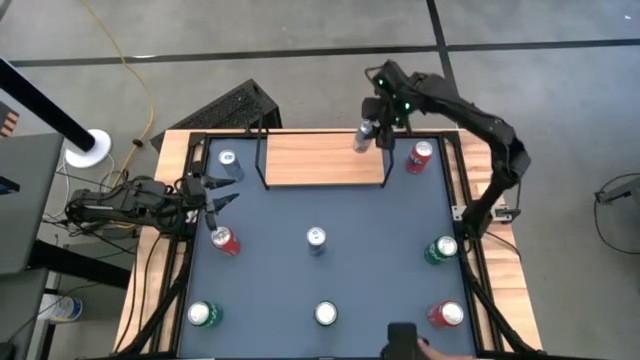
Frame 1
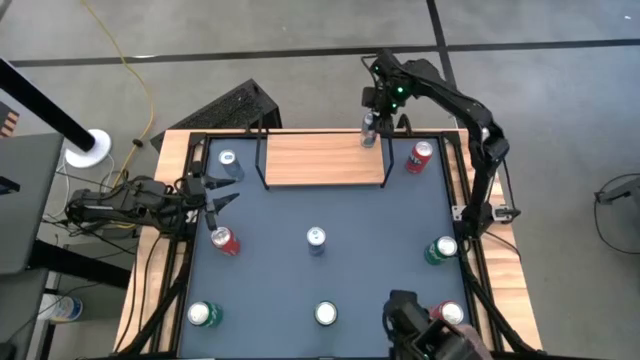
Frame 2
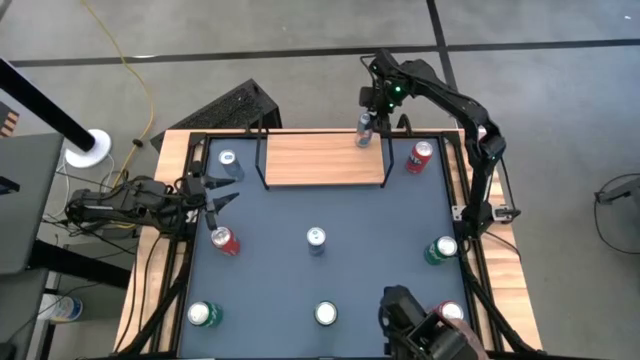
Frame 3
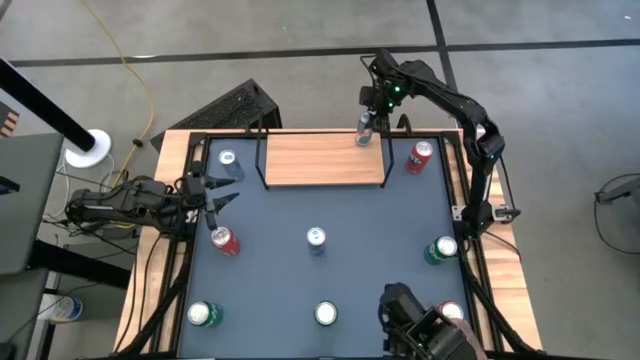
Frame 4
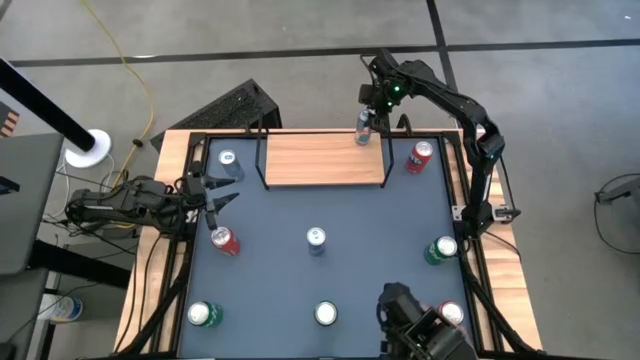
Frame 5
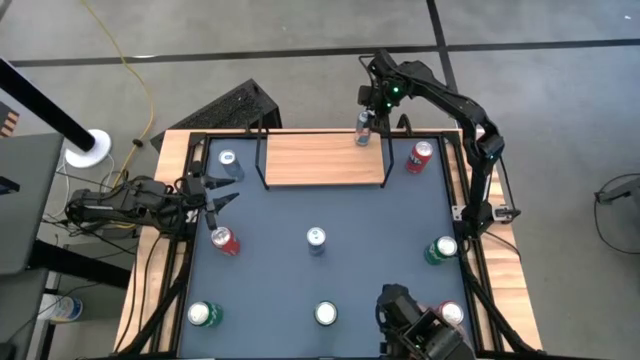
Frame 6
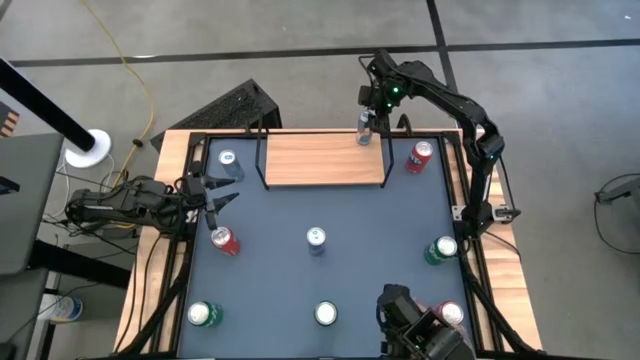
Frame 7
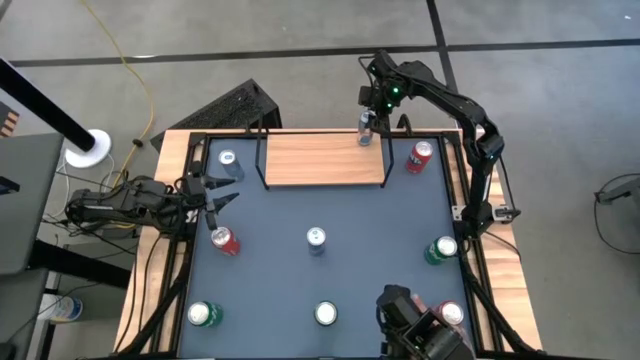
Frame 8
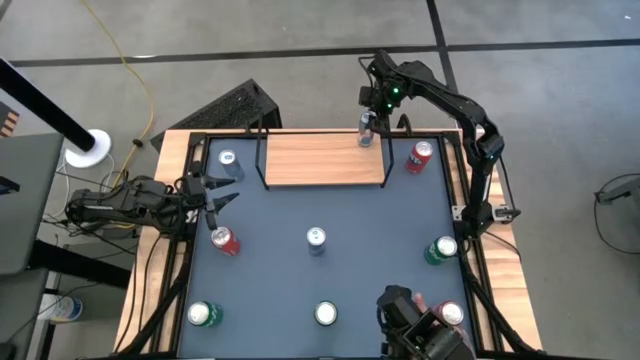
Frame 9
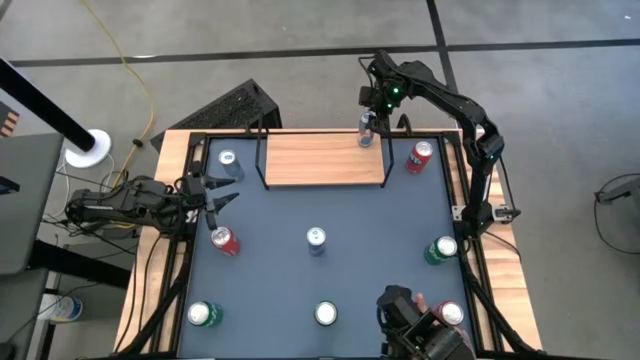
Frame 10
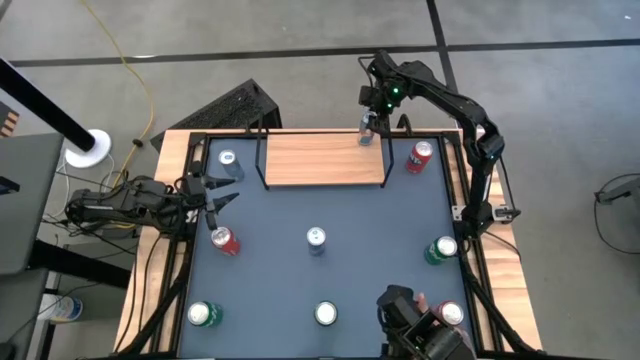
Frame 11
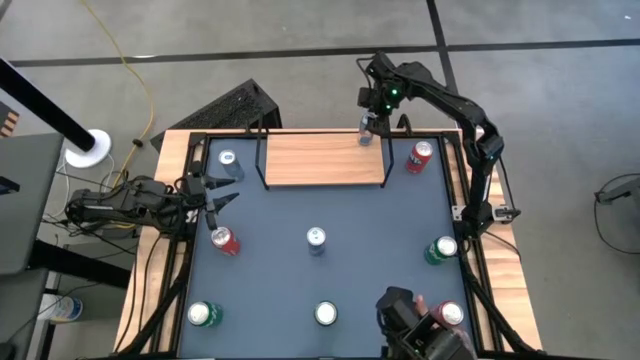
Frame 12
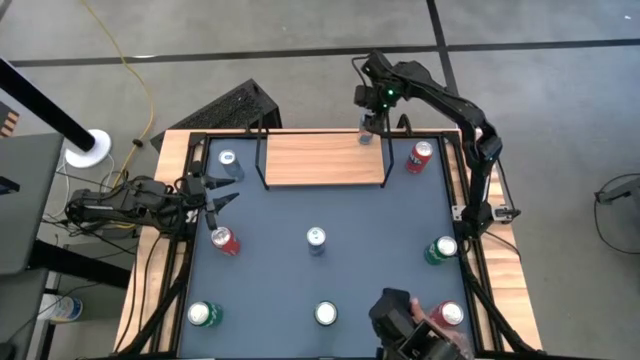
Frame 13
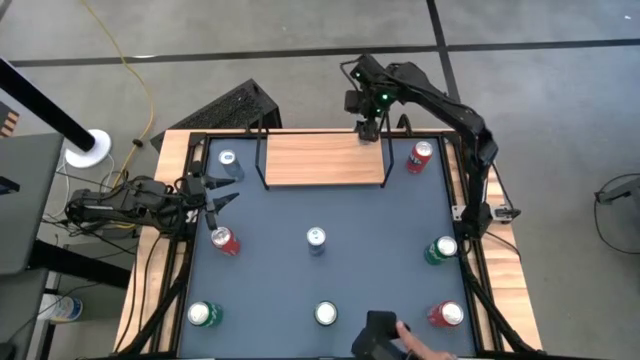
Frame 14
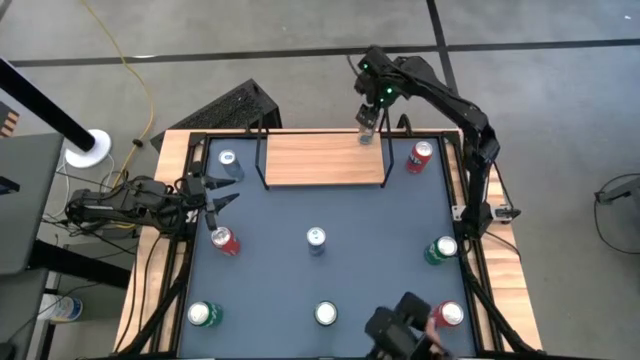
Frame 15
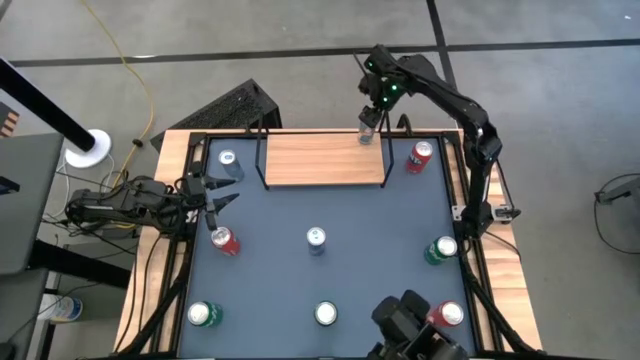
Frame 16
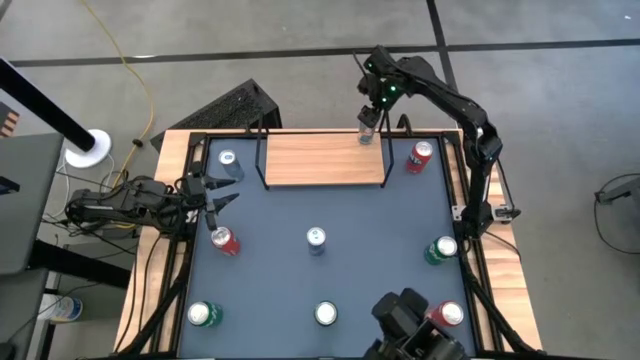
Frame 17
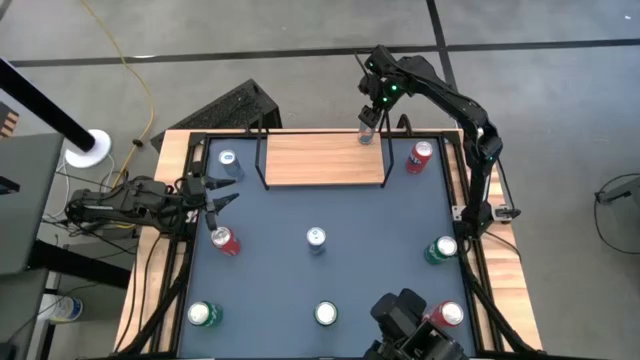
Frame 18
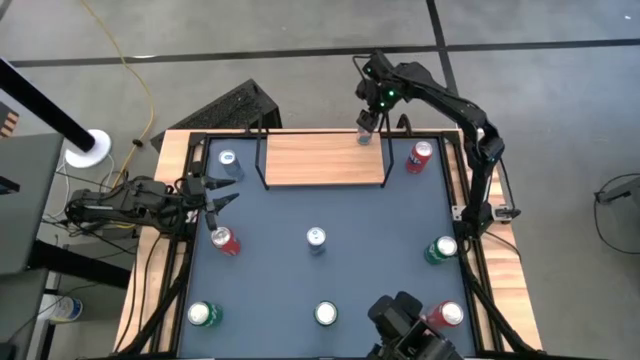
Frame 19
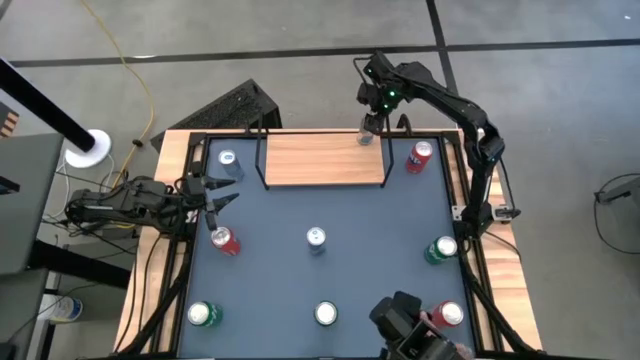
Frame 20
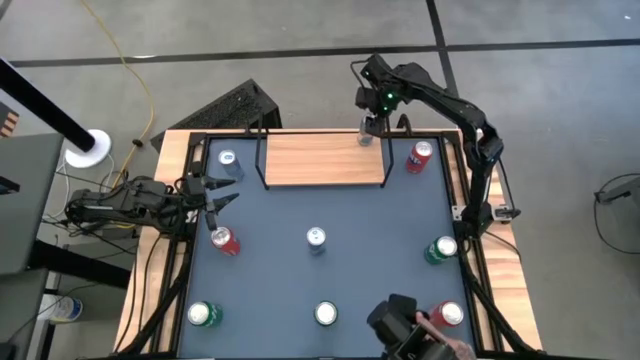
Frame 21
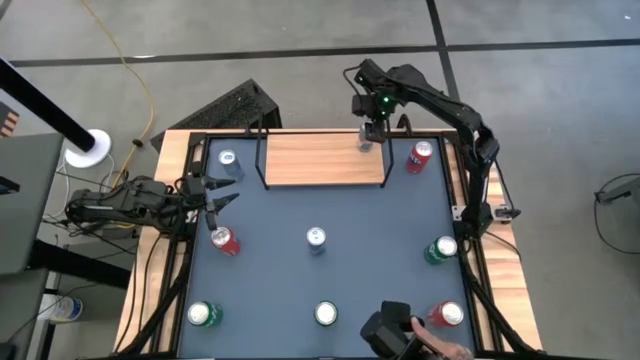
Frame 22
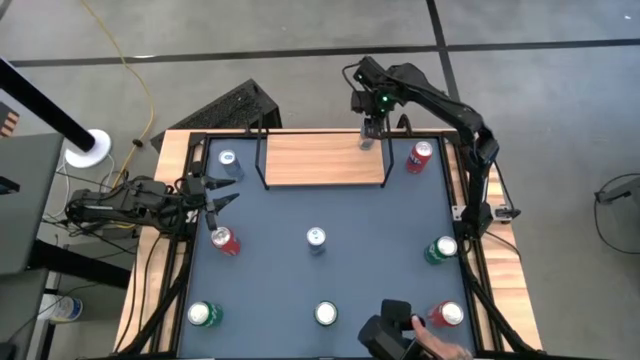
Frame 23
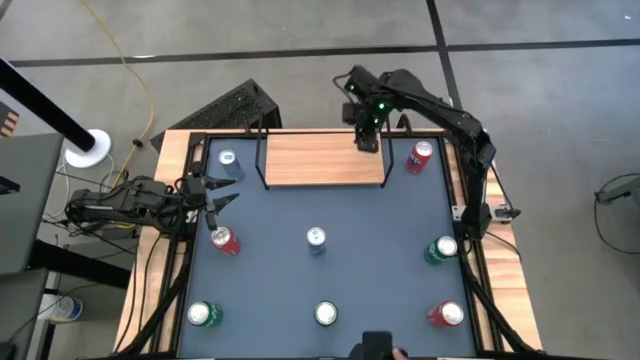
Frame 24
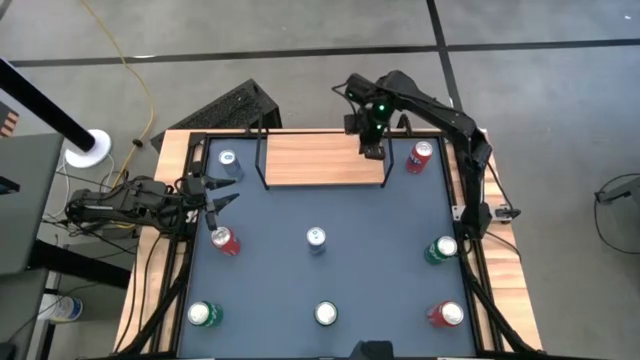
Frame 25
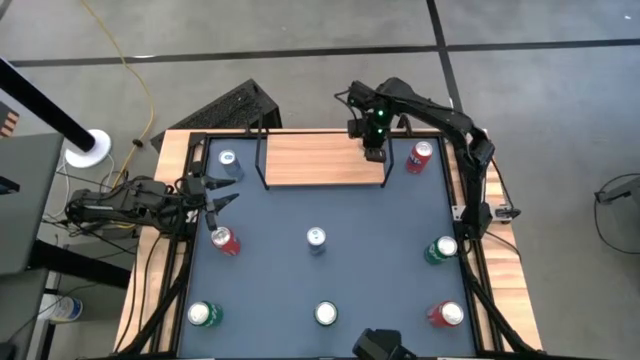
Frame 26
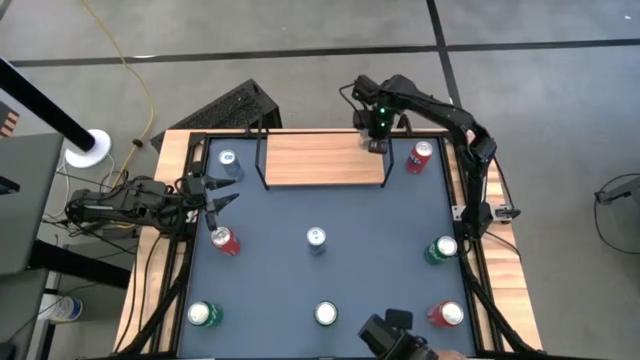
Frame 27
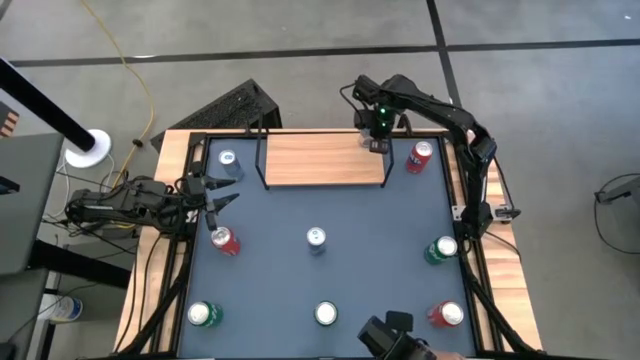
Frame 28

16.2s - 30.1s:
Task: Place canned beverage on shelf
Put the bottom right blue soda can on the shelf

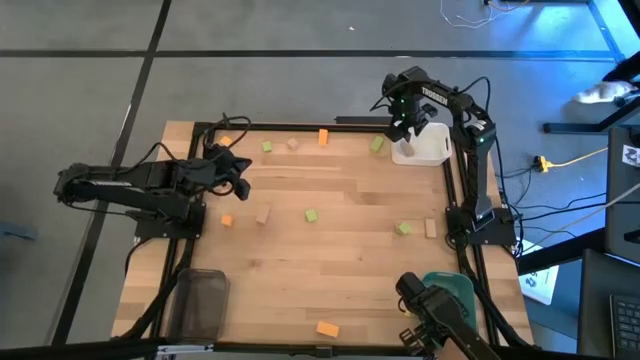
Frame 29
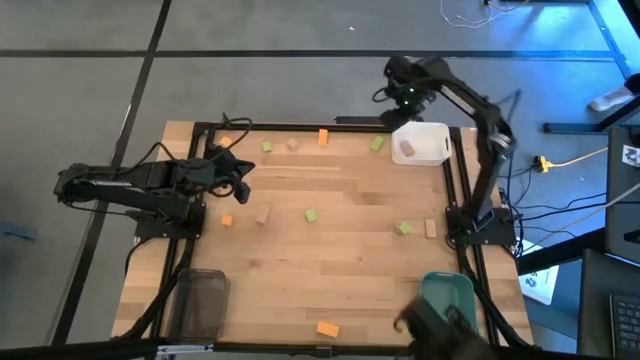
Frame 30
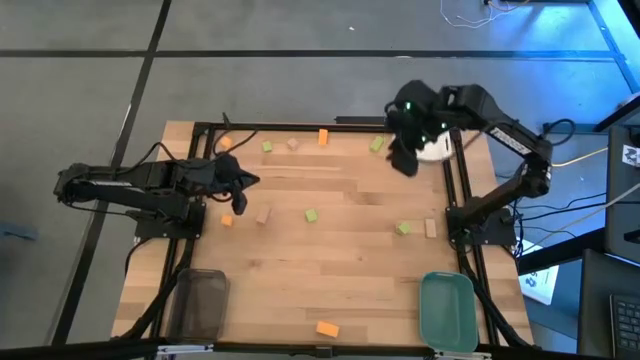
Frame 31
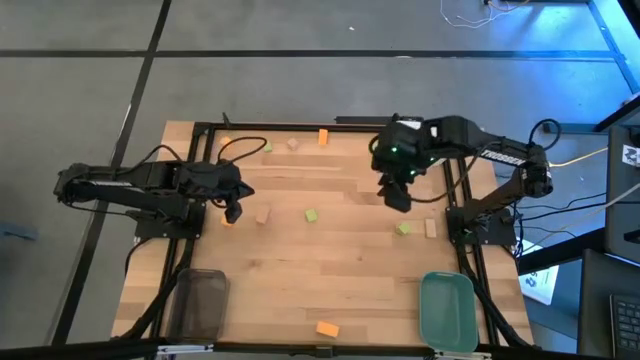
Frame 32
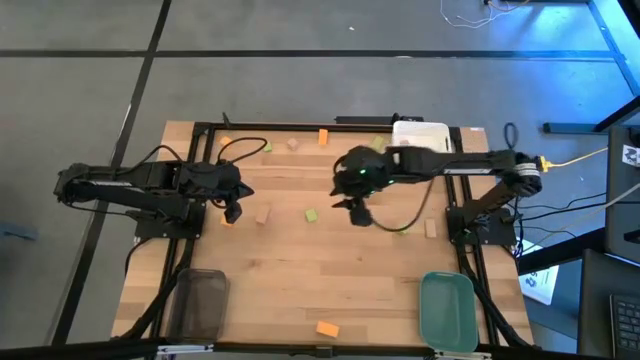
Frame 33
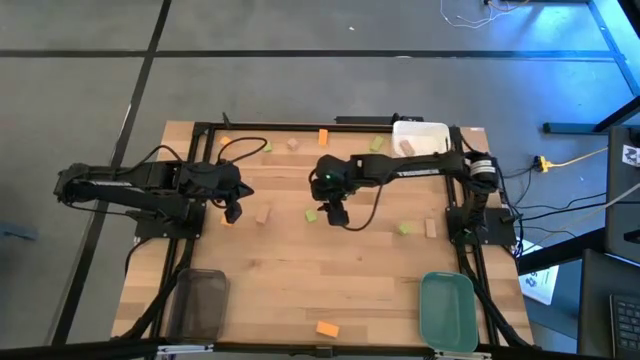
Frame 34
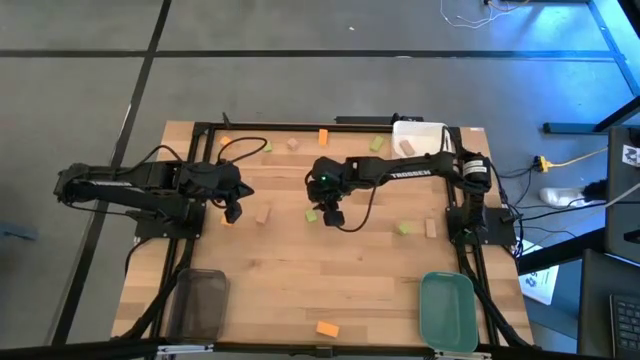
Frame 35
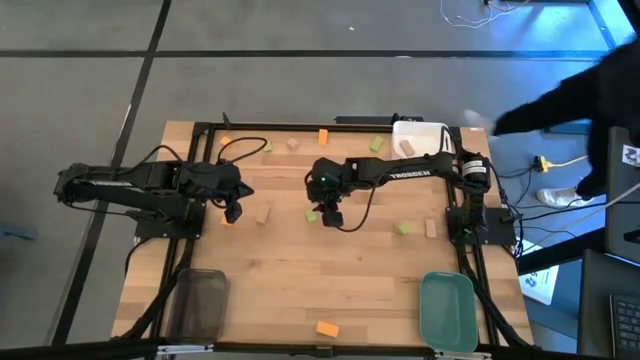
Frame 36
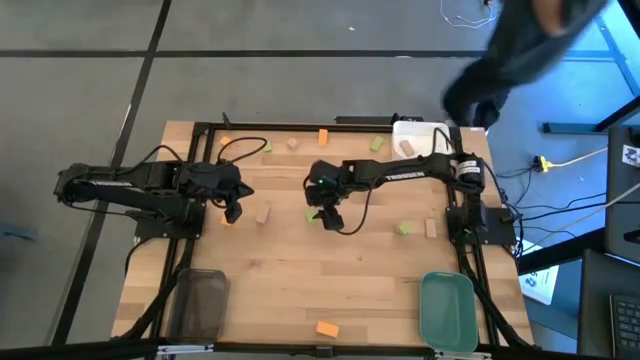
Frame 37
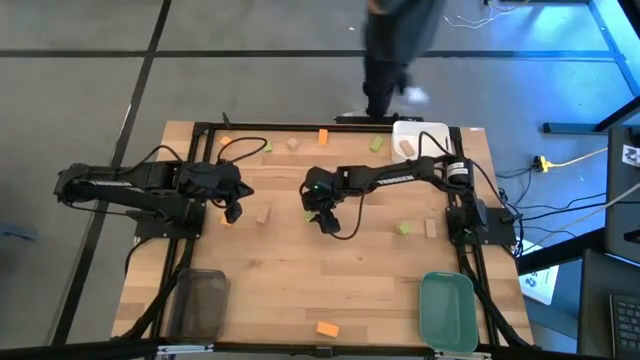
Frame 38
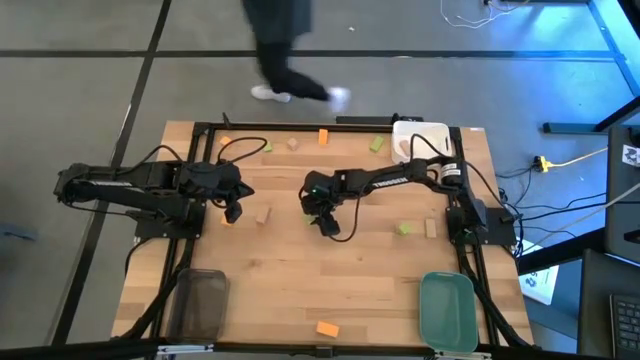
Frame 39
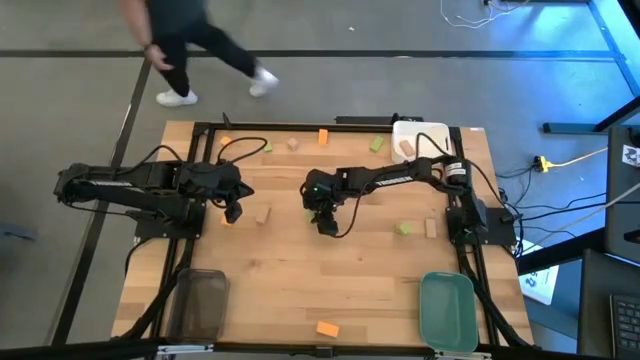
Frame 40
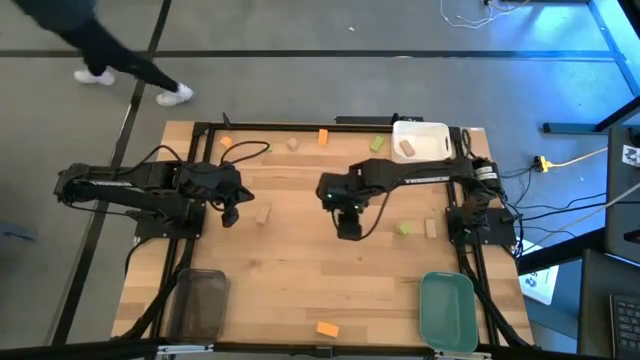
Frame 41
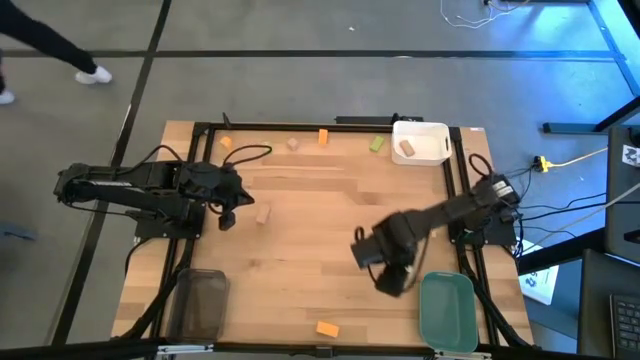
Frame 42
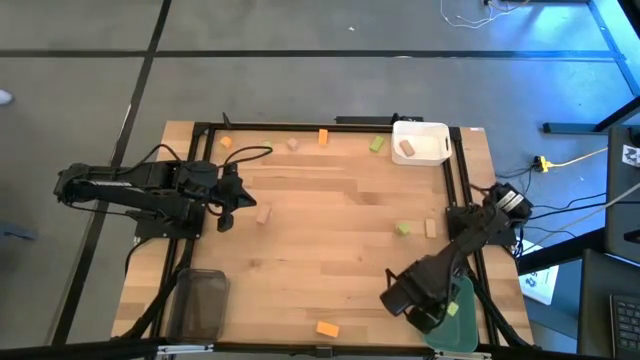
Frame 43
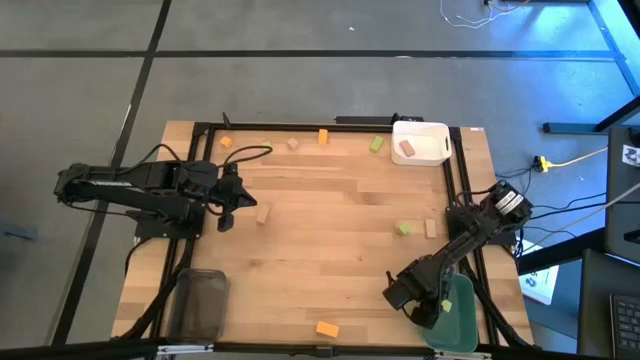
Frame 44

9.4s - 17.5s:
Task: Sort & place blocks by color
Put the bottom left green block into the blue bin
